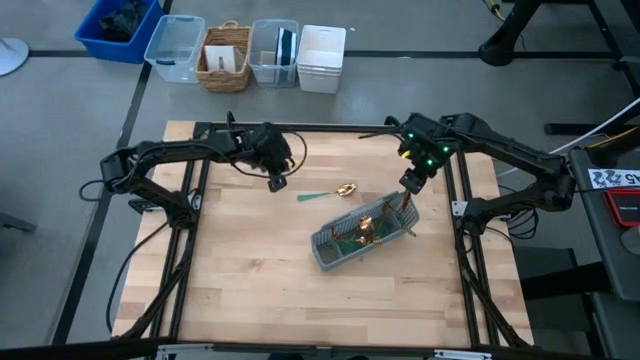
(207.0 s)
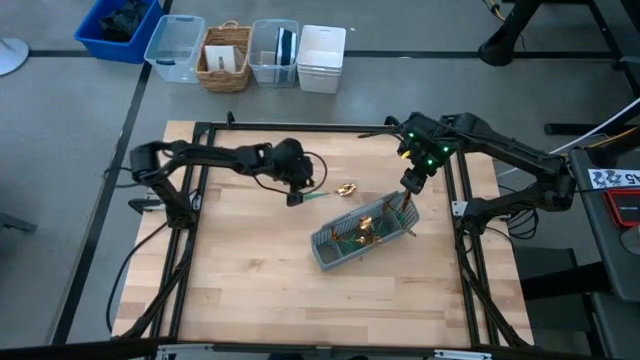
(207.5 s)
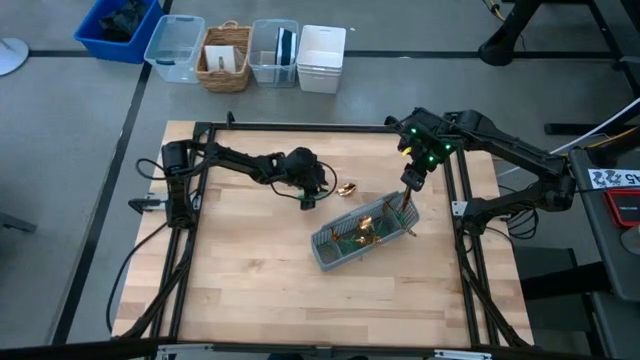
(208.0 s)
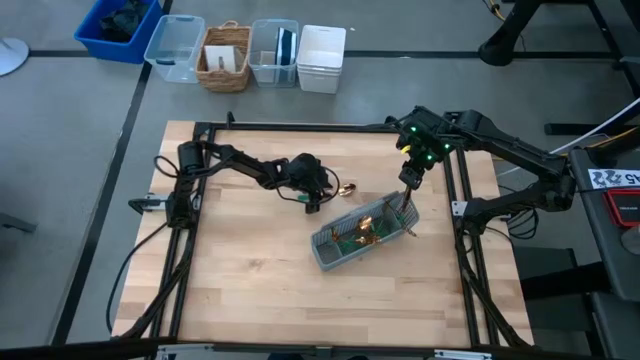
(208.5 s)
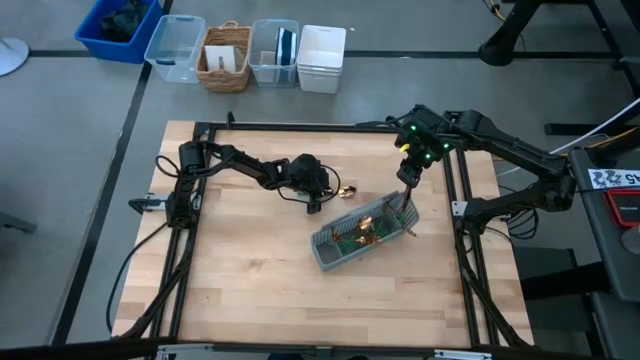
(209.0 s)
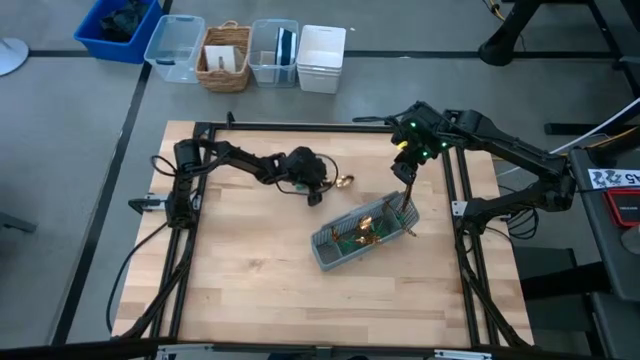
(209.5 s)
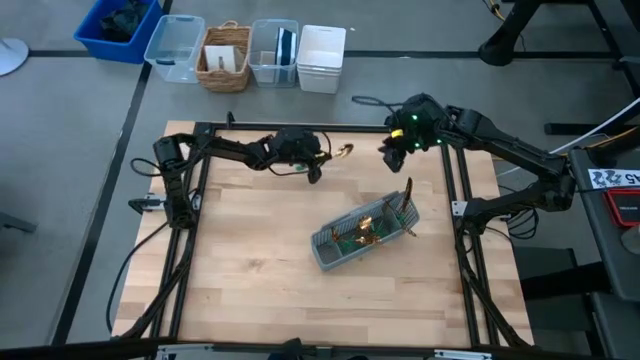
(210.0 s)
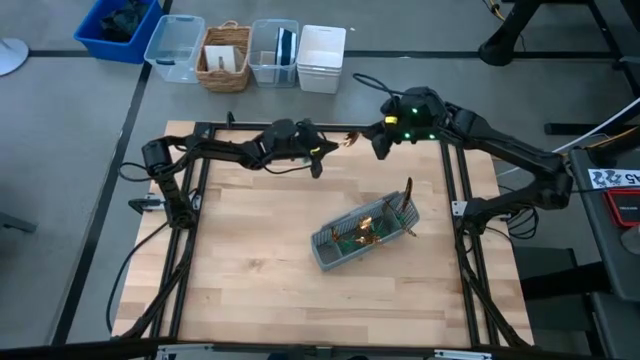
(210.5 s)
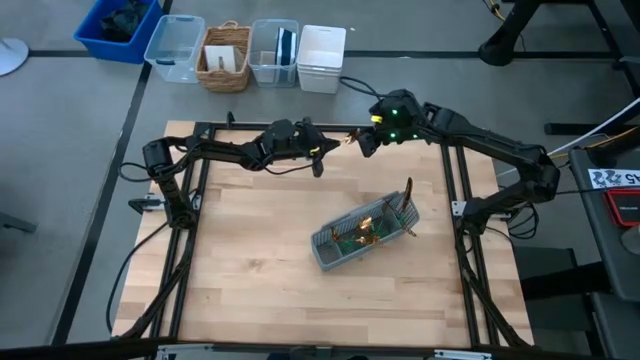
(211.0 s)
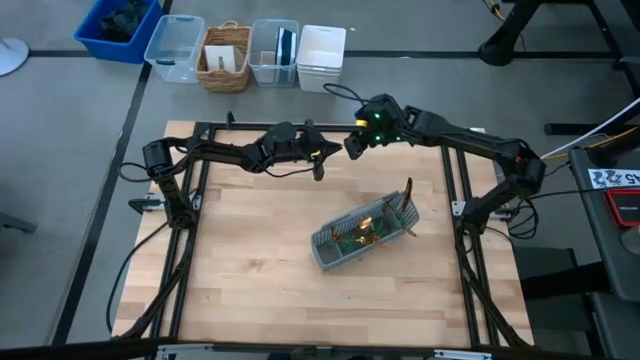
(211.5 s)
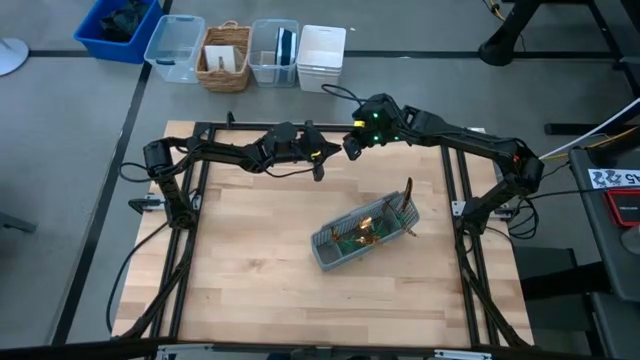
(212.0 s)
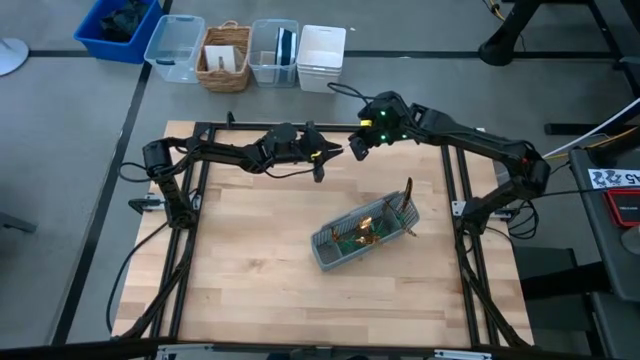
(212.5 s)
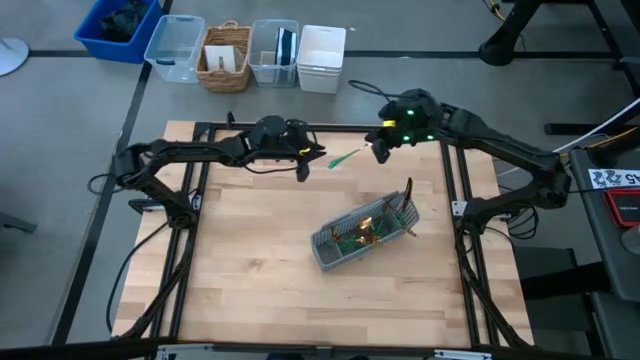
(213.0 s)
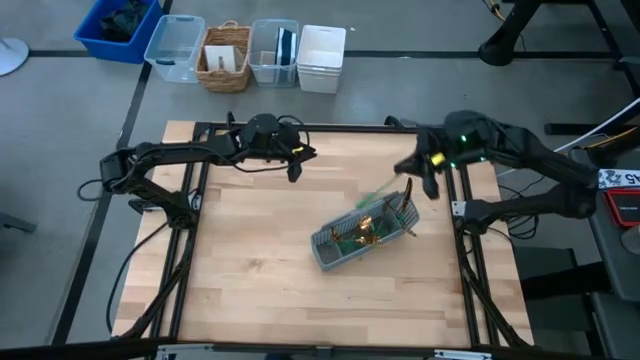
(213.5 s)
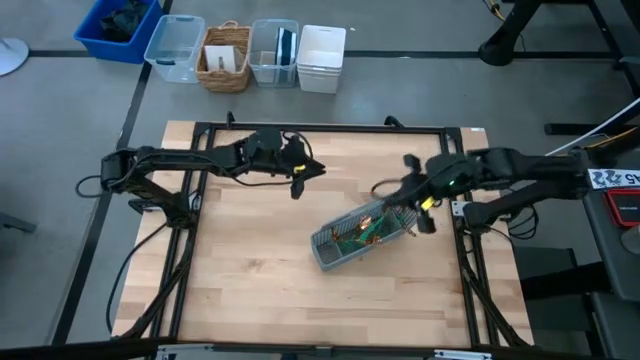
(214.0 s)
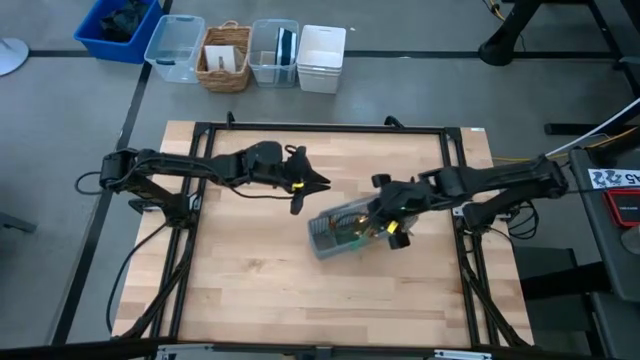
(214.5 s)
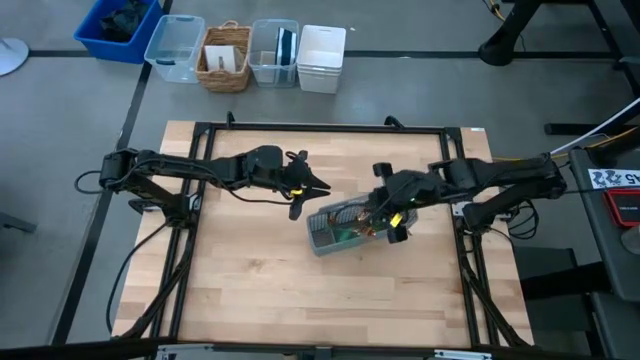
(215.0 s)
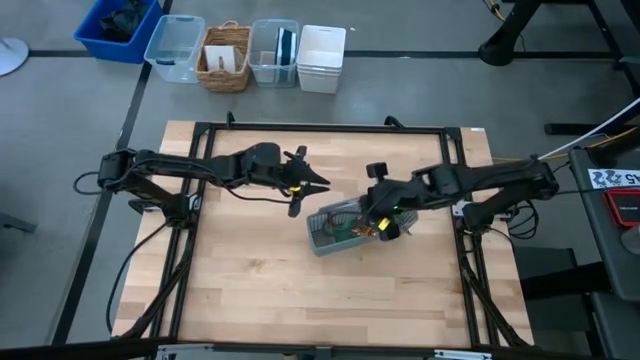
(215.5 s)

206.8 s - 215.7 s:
Task: Sort silverware
Put the gold spoon into the gray silverware organizer

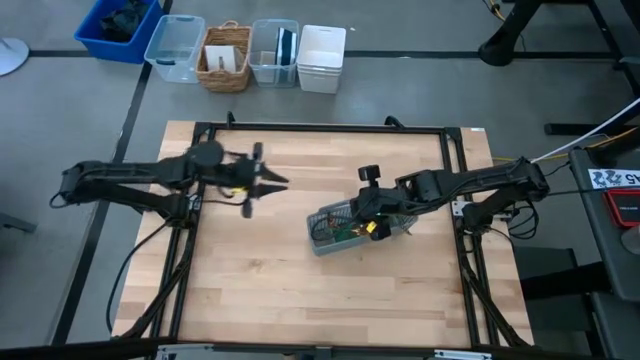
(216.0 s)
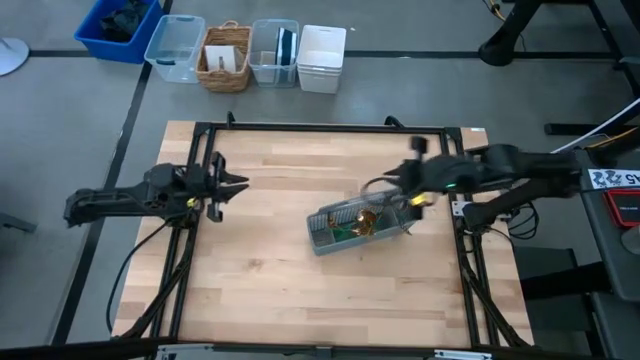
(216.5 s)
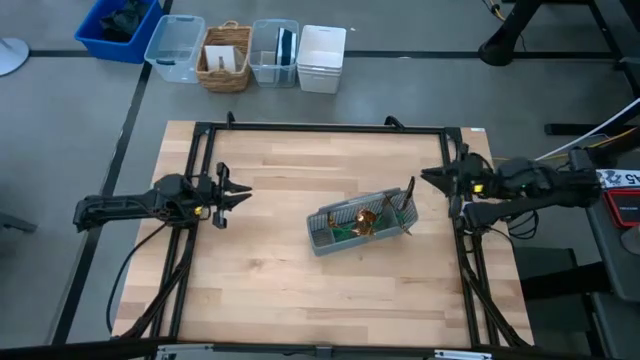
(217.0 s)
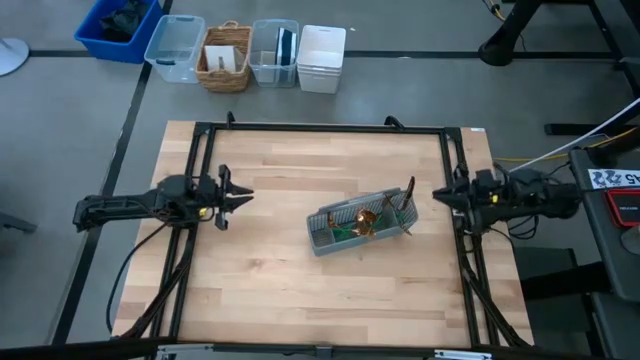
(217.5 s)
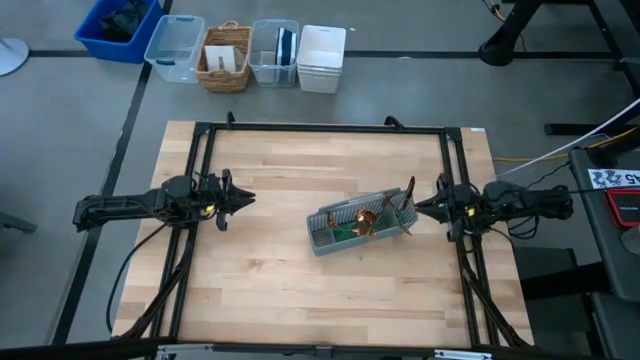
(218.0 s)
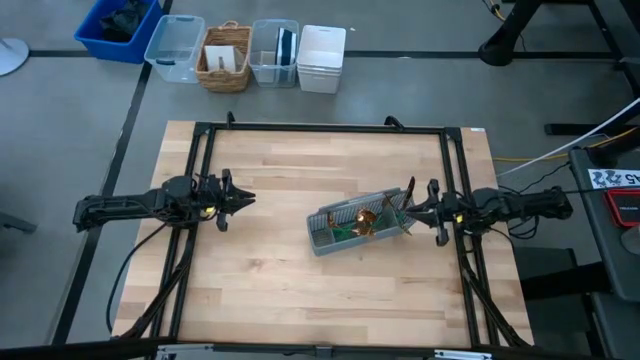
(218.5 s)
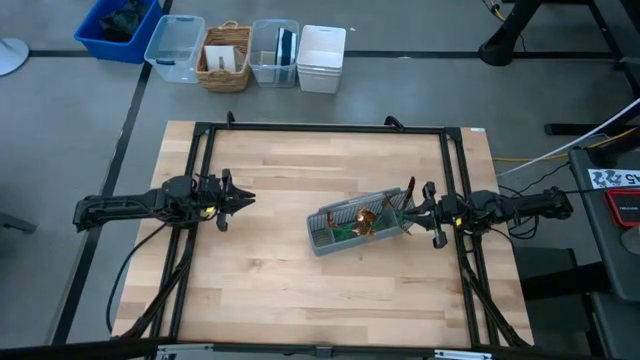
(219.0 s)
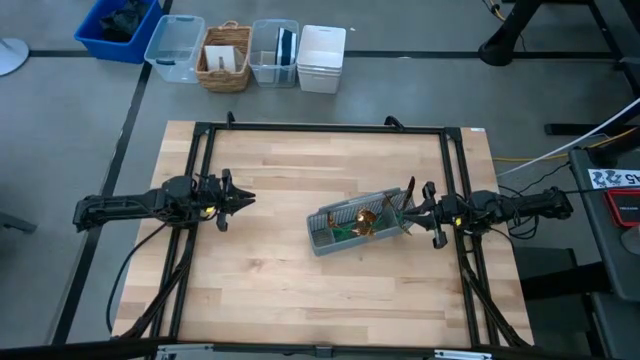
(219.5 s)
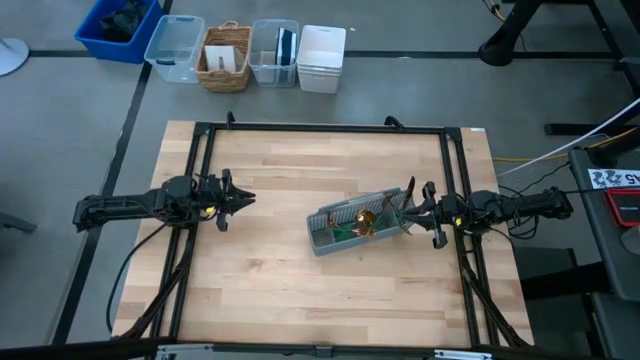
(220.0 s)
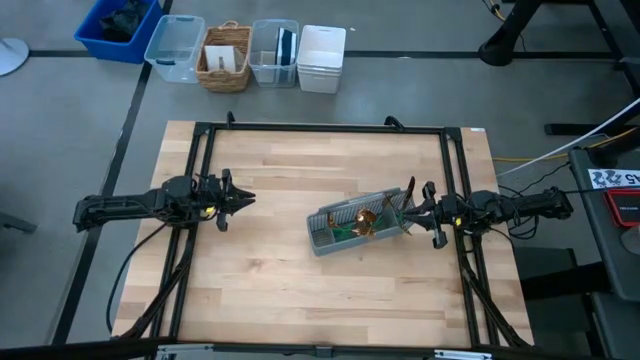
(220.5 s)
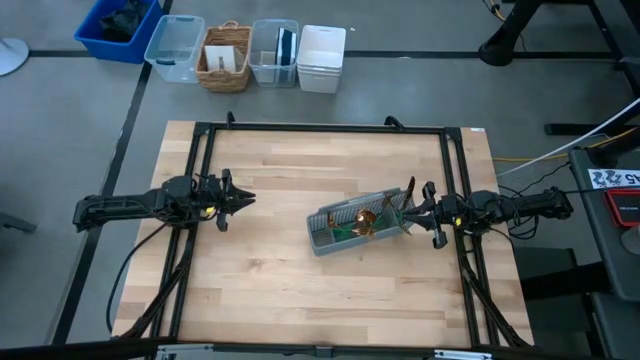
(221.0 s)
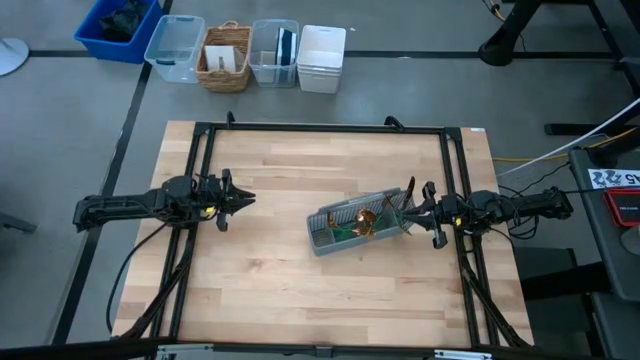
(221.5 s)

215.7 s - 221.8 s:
Return to Home Position

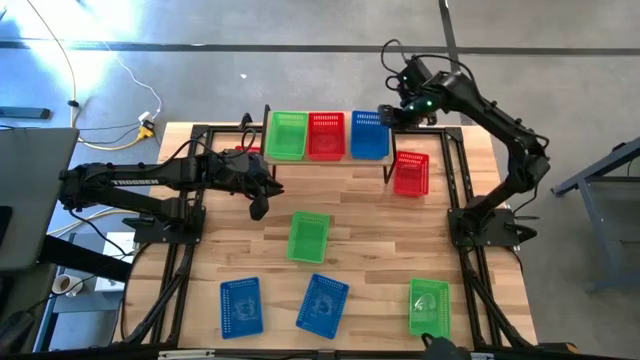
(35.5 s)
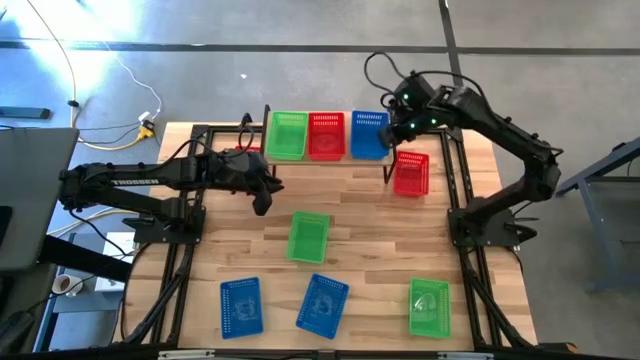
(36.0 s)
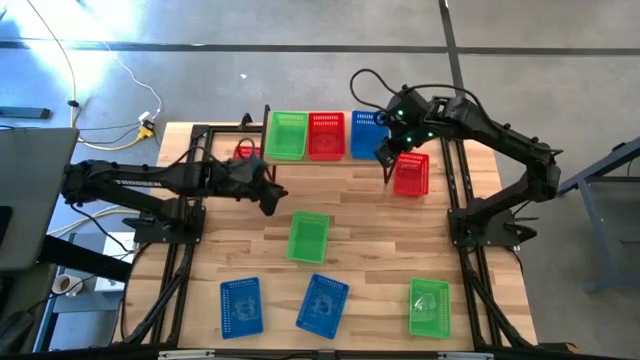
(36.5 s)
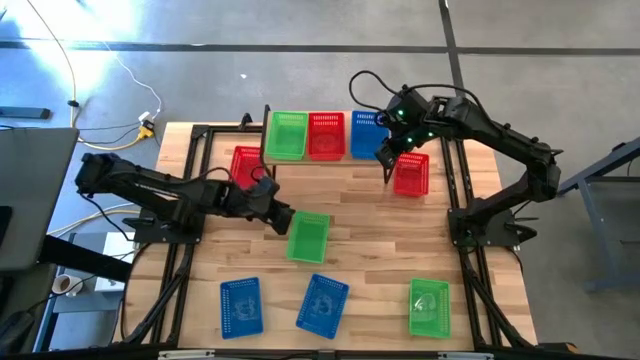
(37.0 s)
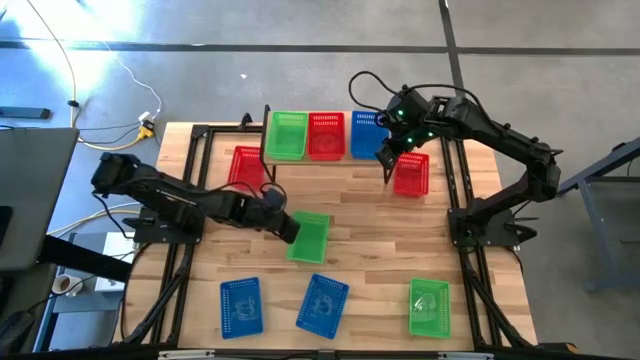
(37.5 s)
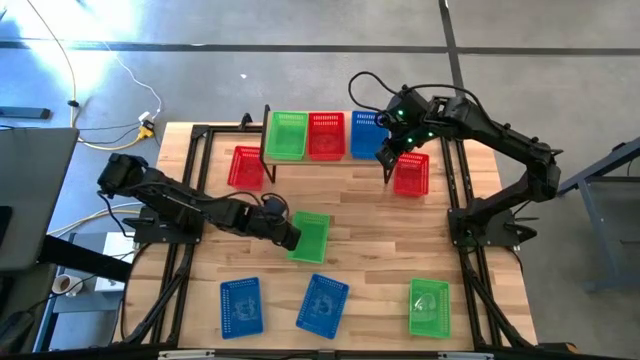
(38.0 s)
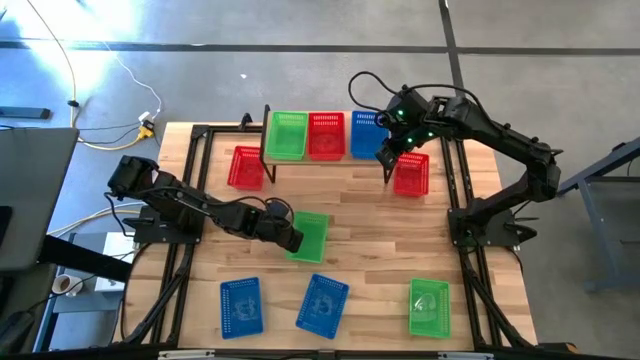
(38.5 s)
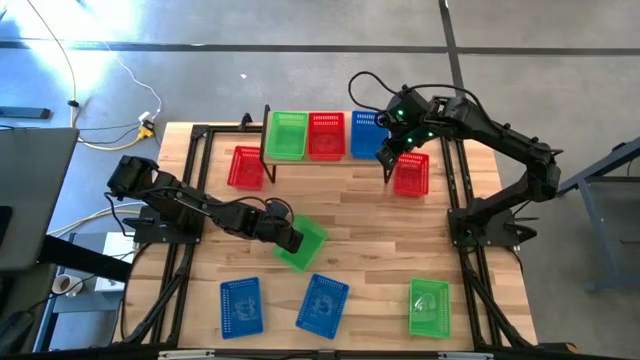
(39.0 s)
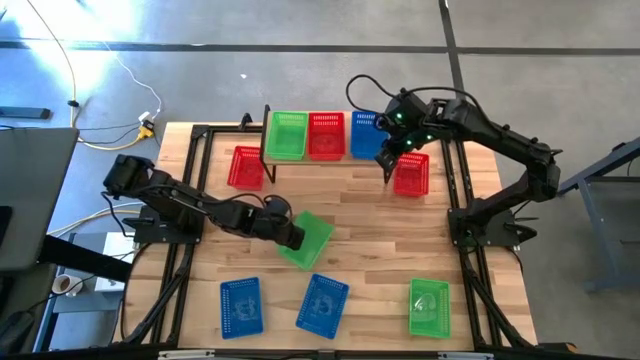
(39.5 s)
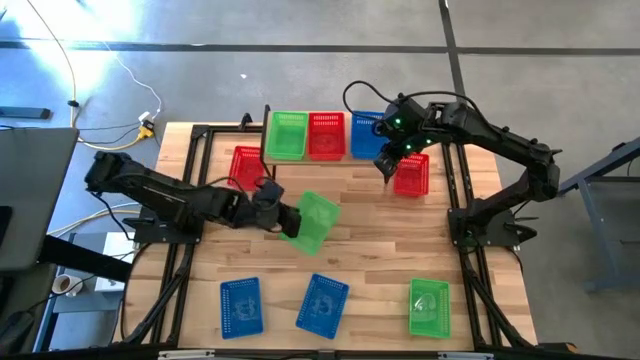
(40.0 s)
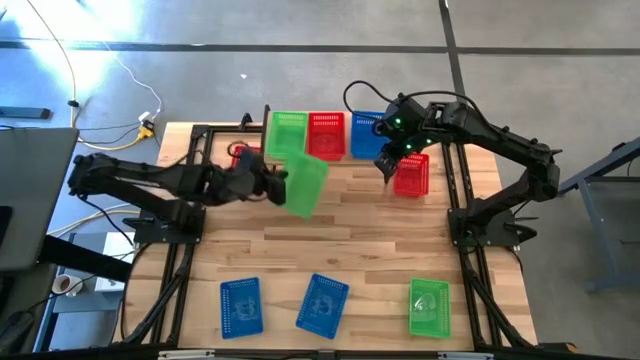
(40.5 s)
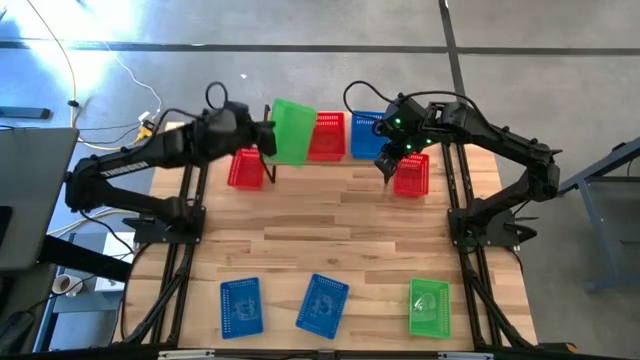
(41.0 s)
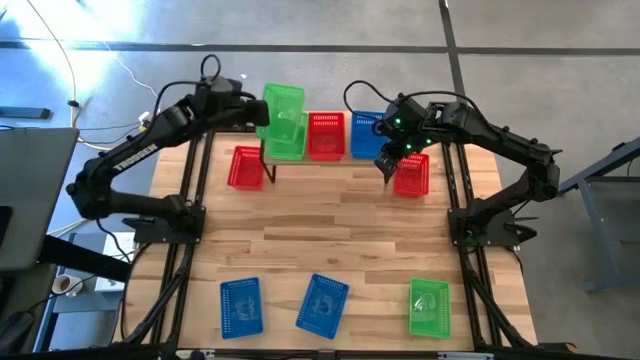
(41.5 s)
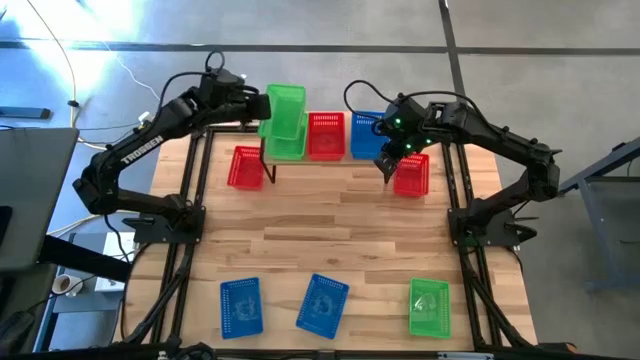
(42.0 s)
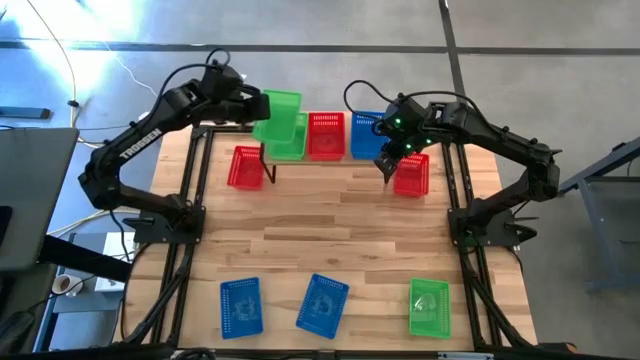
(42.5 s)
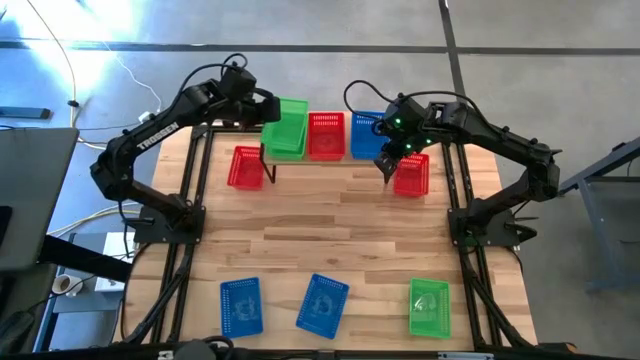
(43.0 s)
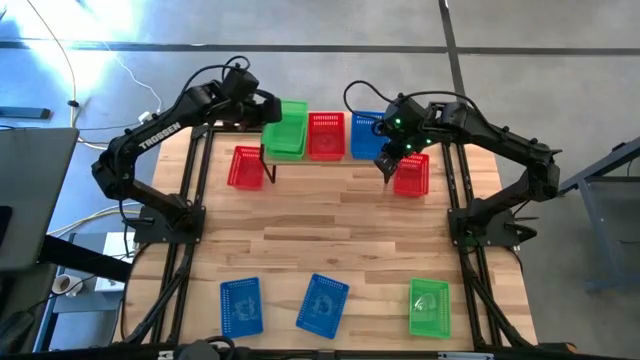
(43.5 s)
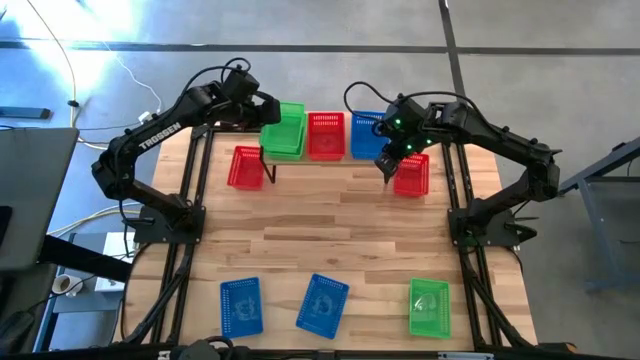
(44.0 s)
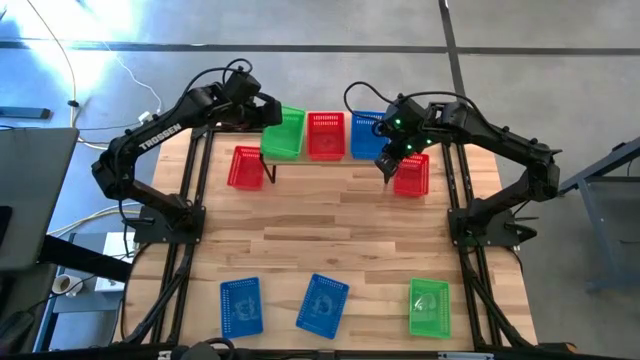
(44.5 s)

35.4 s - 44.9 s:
Task: Stack baskets on shelf by color
Stack the top green bin on top of the green bin on the shelf
